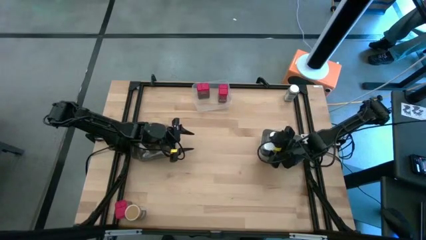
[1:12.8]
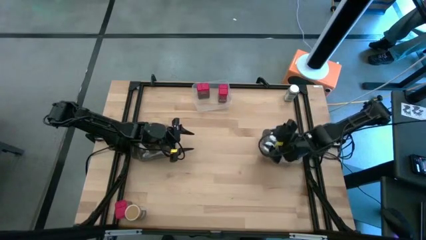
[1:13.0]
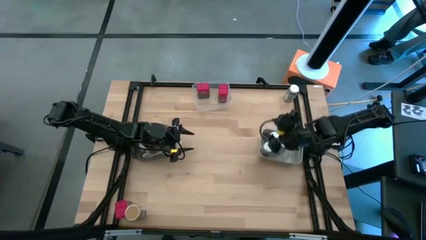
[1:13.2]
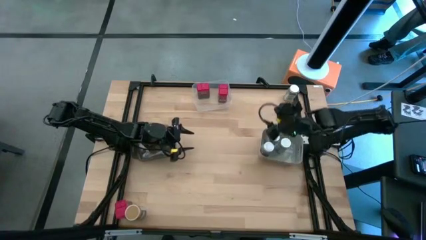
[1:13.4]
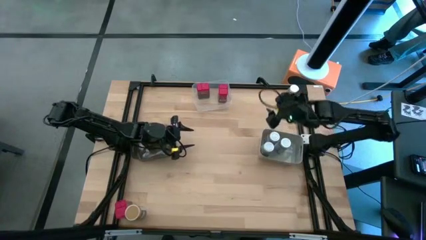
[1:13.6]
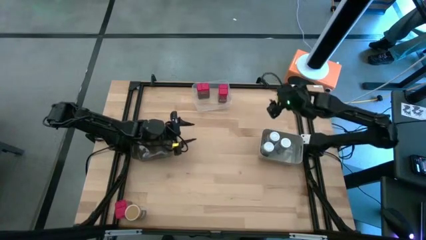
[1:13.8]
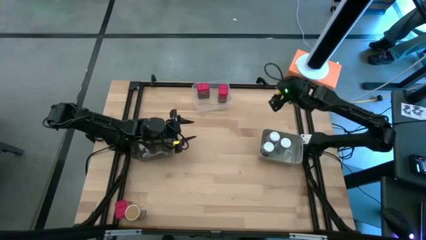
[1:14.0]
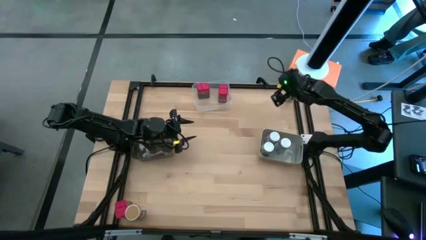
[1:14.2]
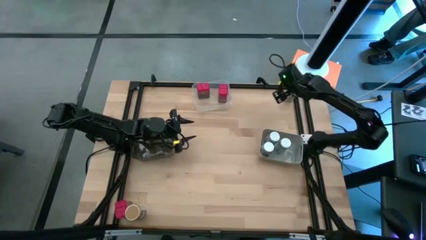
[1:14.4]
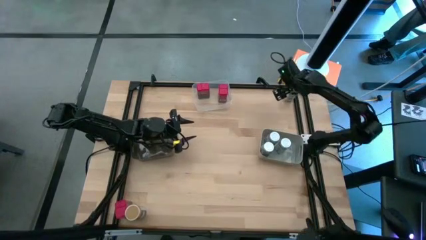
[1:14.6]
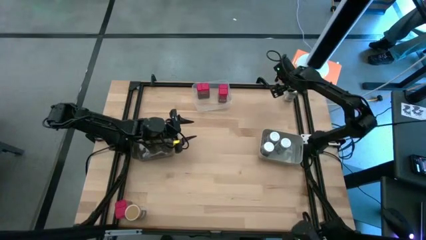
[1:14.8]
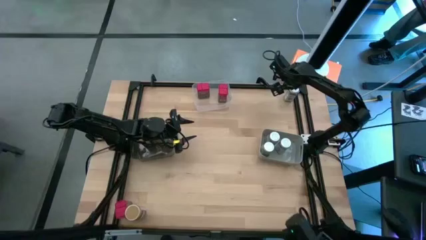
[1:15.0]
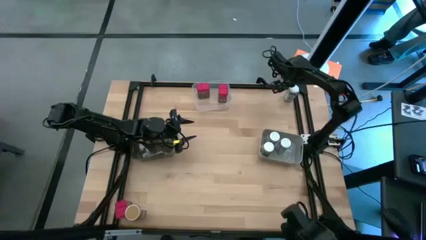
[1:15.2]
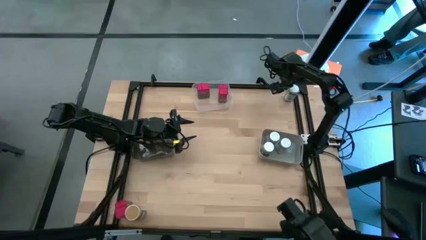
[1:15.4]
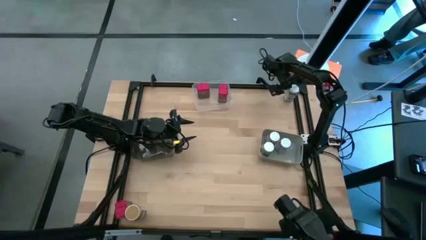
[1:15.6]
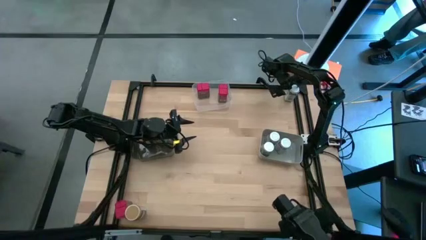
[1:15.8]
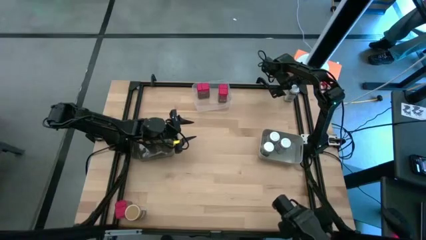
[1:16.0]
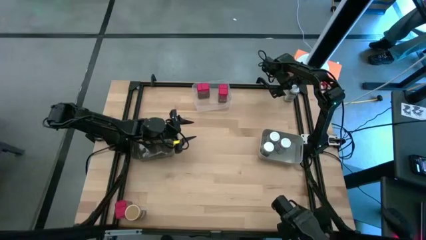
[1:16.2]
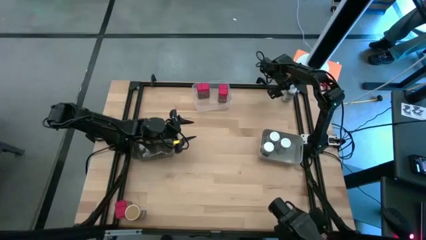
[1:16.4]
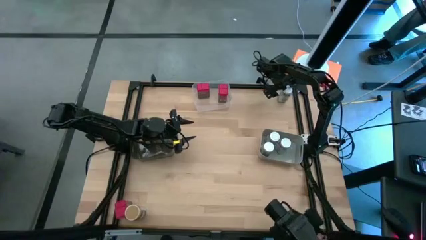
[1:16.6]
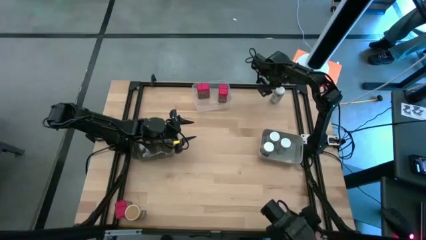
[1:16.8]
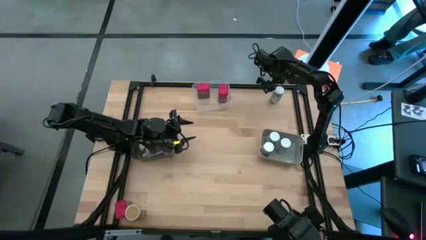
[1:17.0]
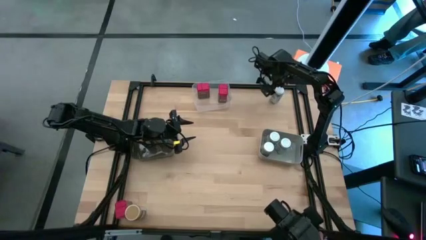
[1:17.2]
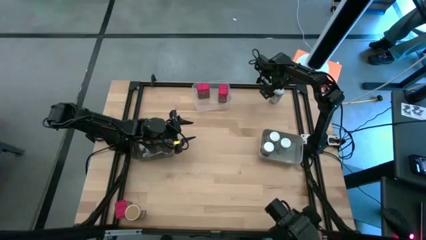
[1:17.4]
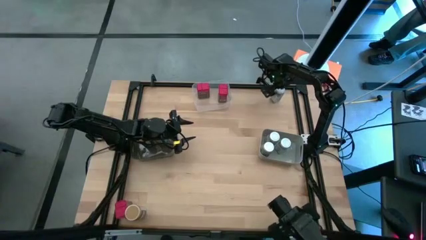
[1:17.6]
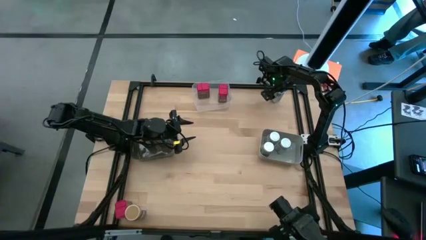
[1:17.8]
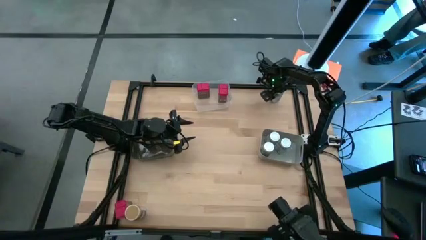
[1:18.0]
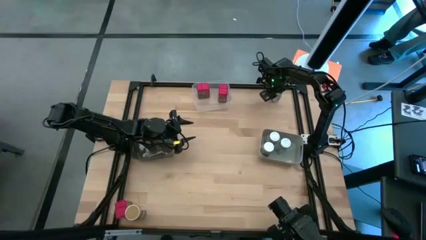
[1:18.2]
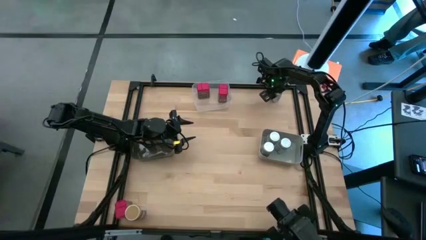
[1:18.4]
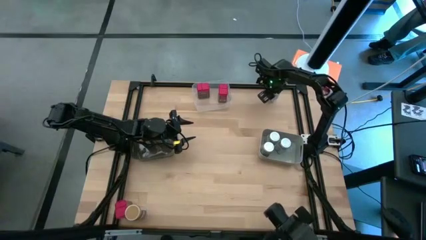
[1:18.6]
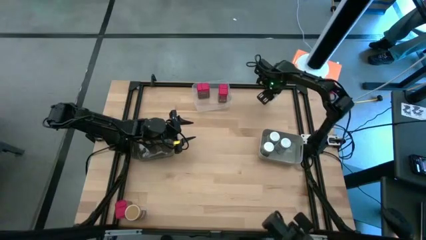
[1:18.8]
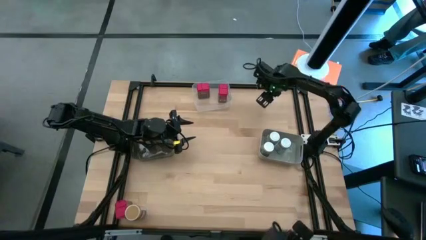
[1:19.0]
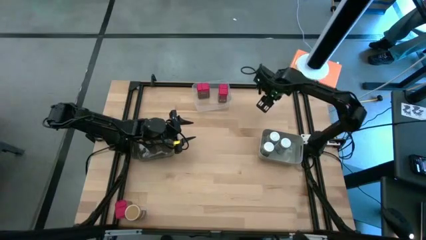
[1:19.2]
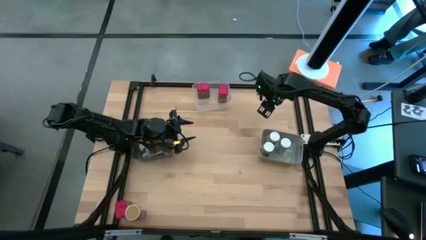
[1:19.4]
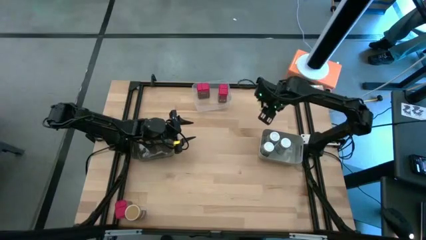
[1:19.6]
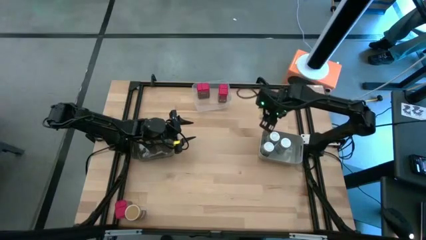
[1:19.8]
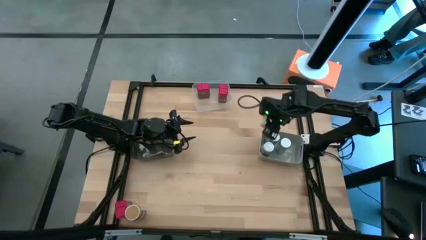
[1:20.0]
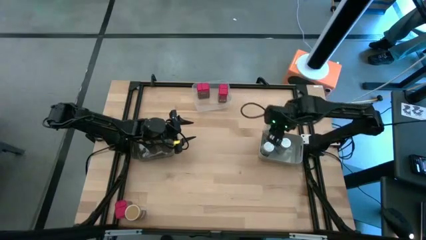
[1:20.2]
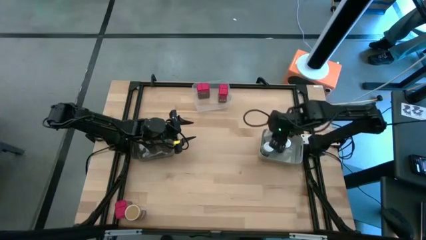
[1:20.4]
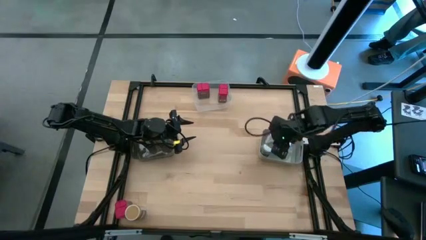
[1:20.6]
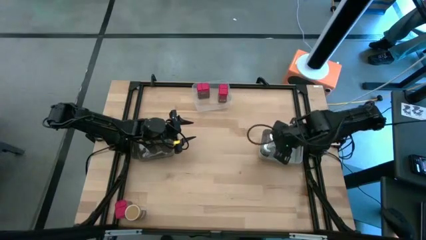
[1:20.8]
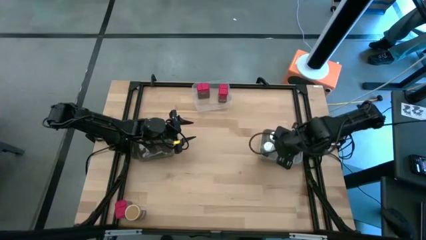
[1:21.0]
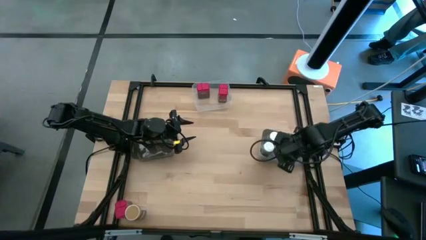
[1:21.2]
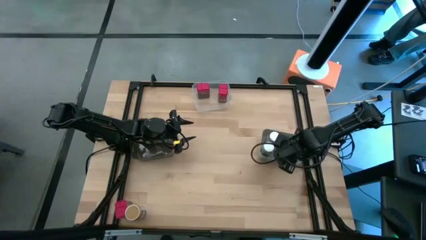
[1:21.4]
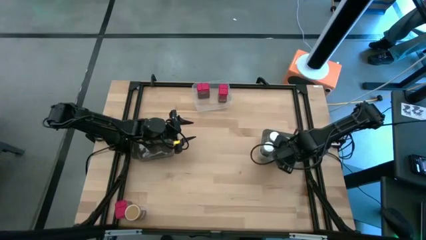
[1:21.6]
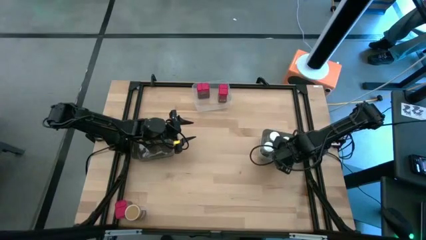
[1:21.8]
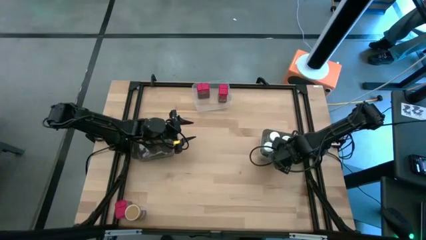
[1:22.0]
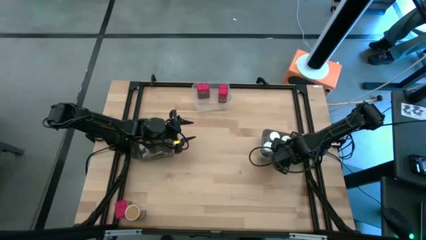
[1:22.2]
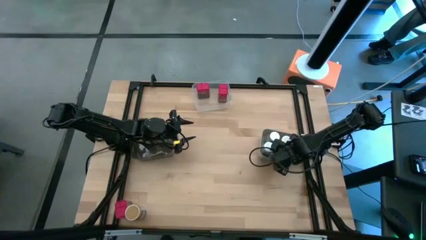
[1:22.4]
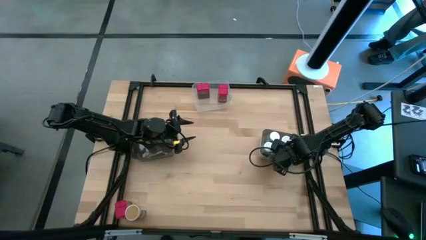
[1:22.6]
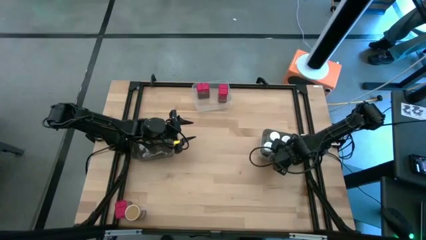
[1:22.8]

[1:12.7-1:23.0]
Task: Sort spices by type
Put the white spice bottle into the gray bin

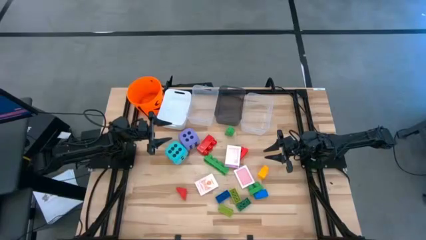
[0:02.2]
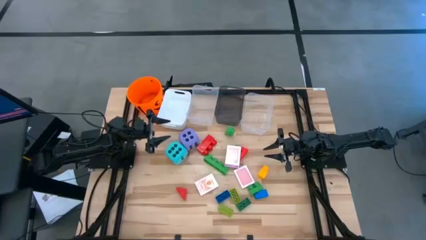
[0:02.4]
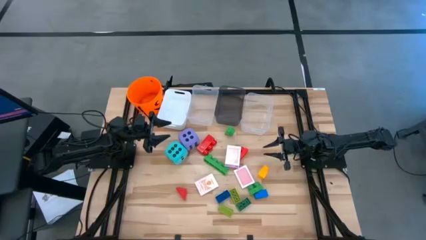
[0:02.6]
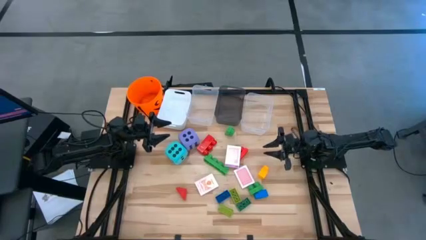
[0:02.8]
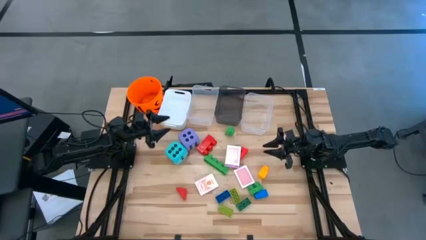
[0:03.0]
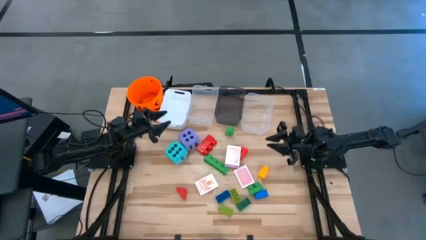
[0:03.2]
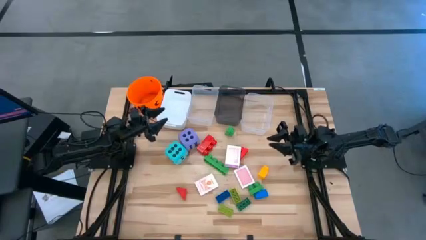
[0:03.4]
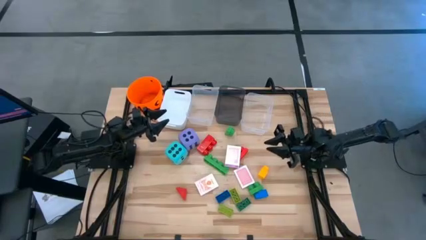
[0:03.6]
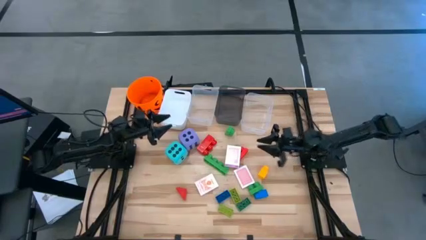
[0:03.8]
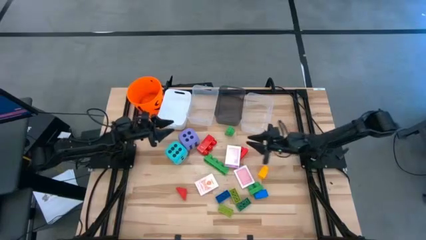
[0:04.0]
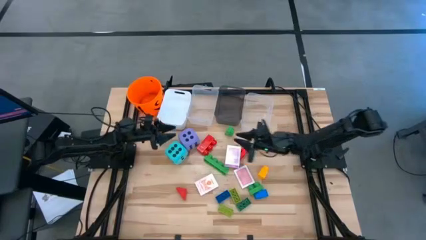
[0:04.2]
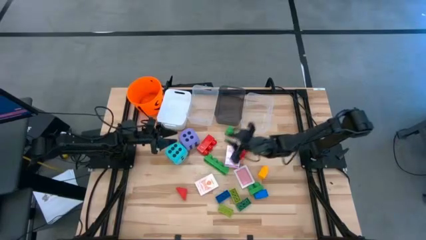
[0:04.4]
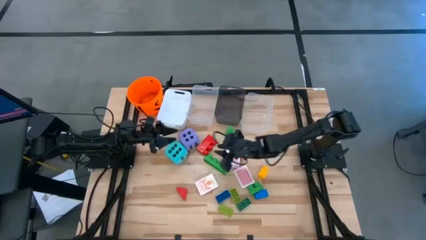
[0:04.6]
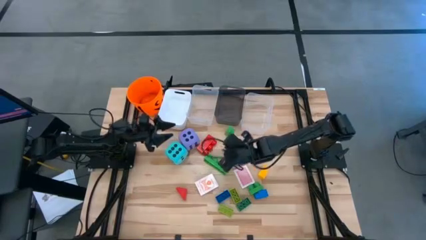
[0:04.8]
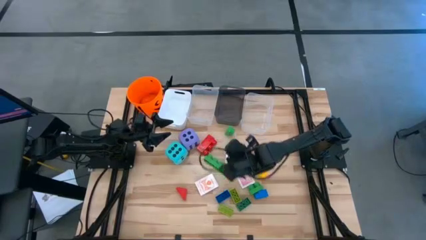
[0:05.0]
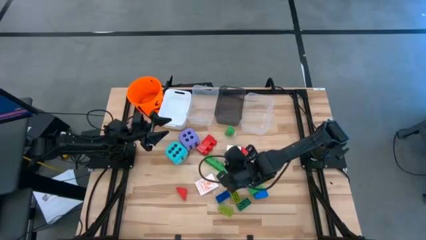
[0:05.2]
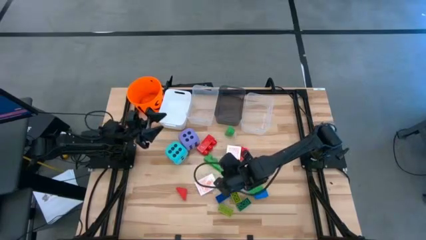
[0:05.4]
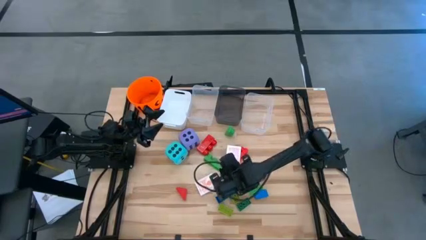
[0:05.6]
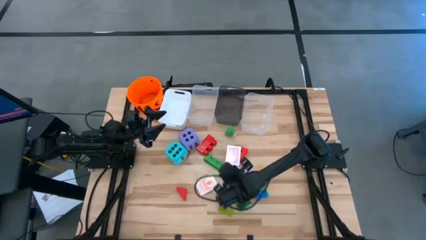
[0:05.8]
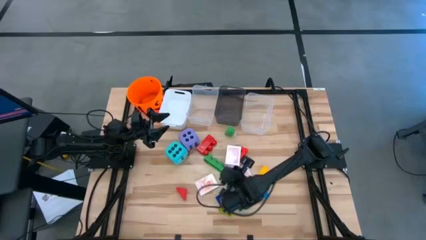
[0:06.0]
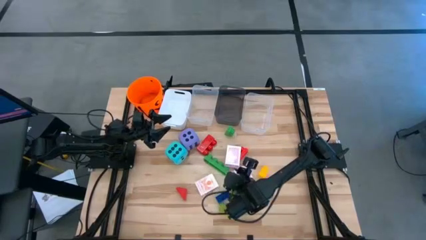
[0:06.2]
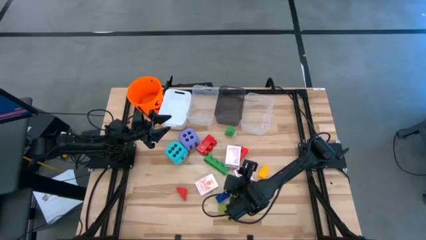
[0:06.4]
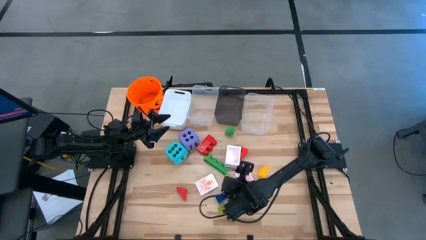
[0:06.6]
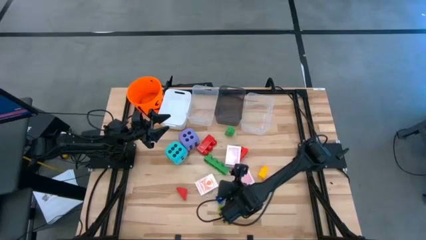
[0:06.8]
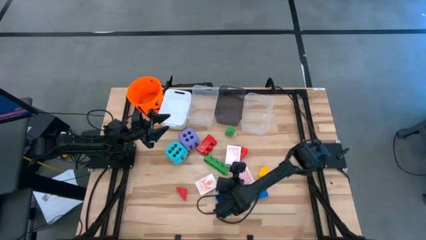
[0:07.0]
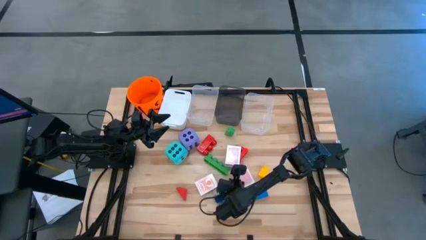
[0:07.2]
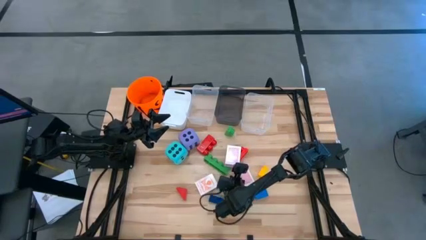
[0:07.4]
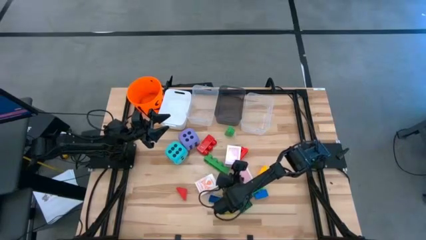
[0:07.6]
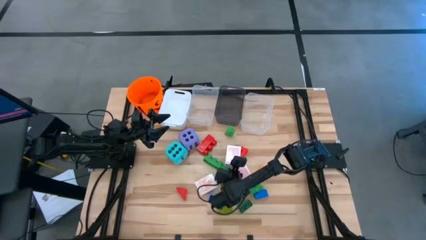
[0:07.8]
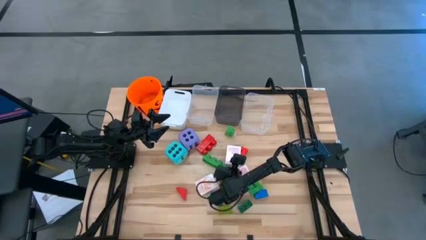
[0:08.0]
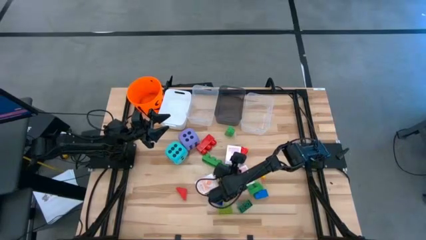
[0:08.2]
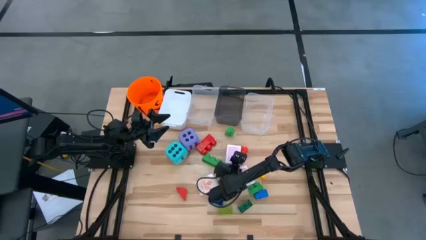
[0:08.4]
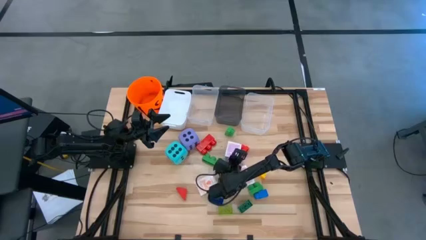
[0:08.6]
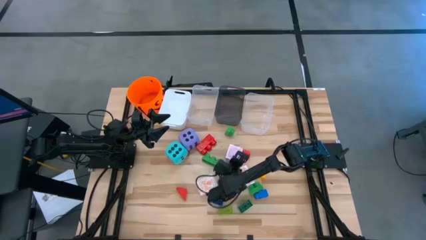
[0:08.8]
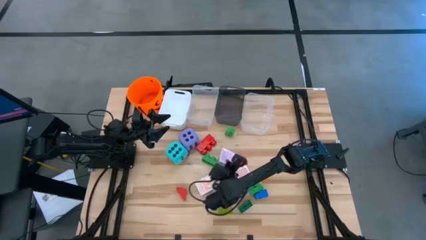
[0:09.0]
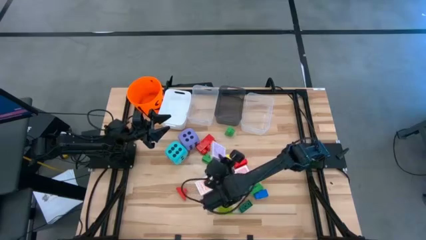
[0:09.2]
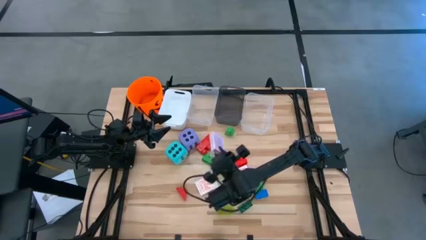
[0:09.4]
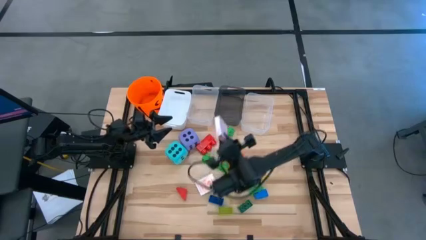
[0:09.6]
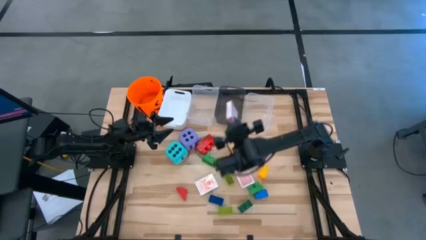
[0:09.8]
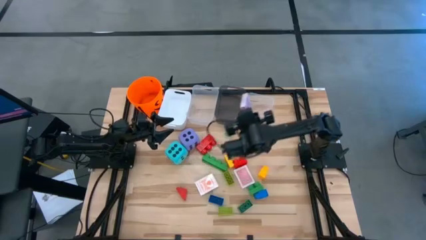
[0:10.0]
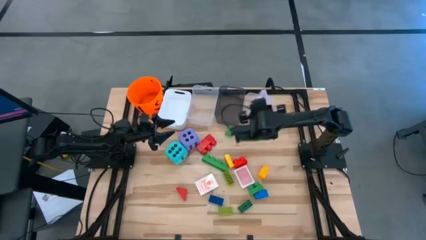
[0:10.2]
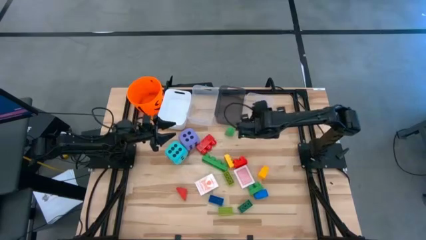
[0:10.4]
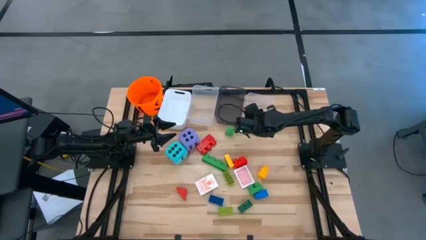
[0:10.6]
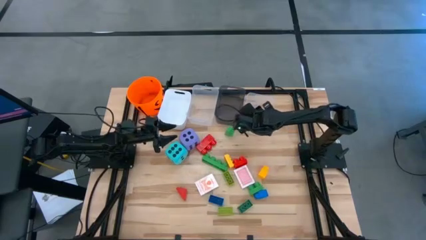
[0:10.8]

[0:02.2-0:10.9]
Task: Pick & Place Toys
Put the pink deck of cards into the right transparent bin
